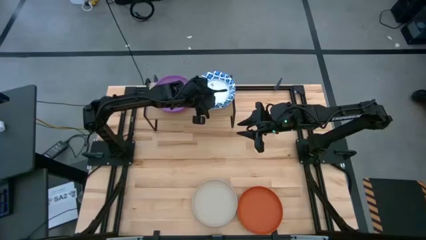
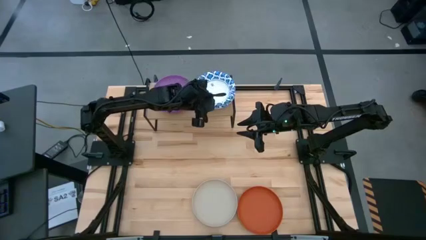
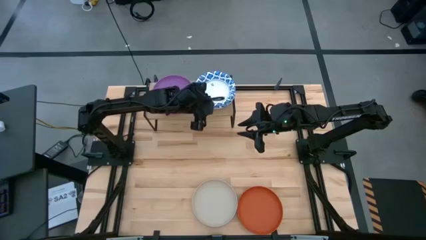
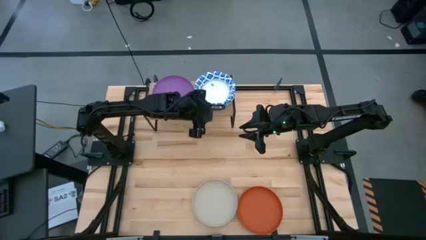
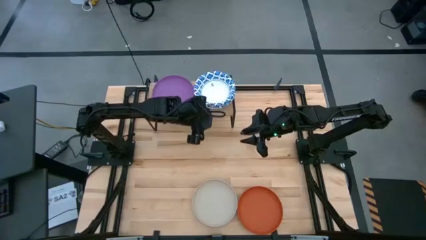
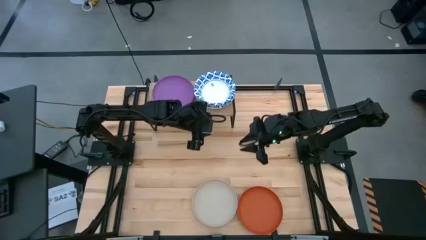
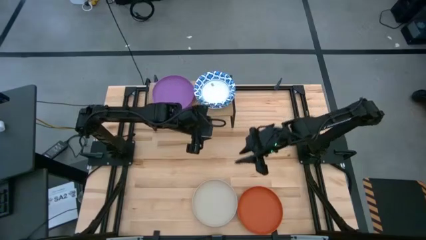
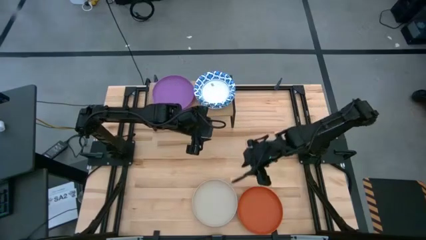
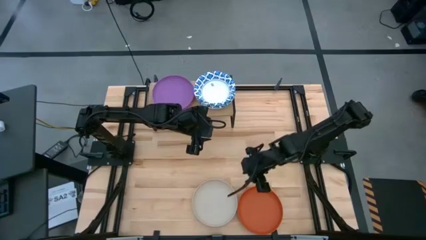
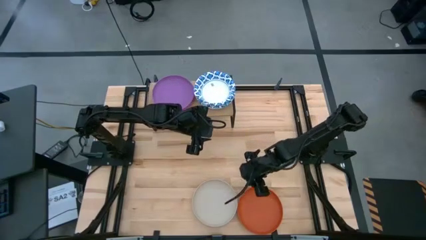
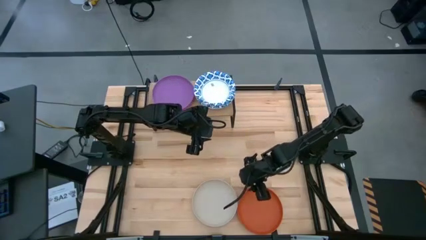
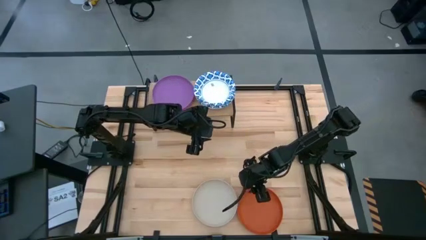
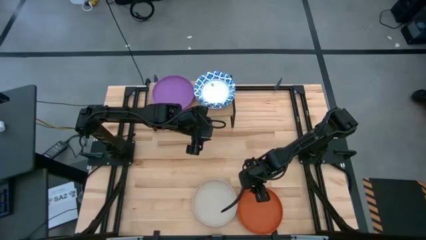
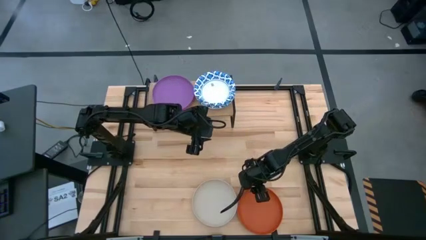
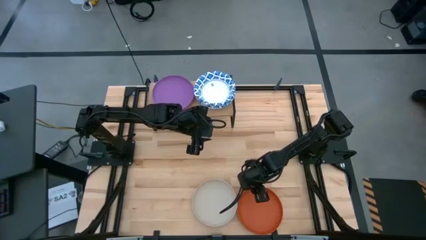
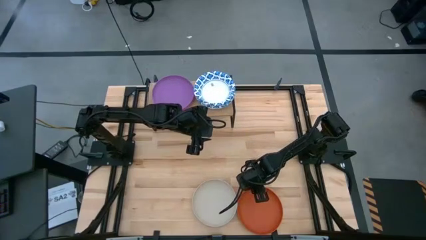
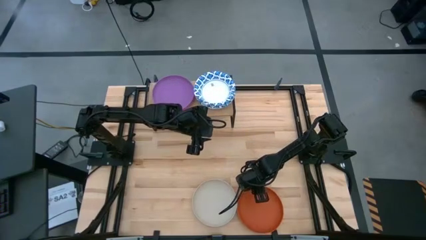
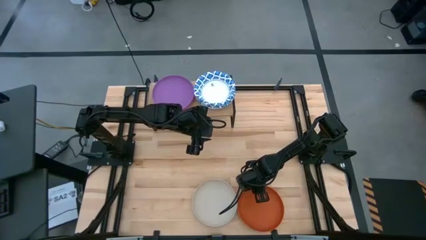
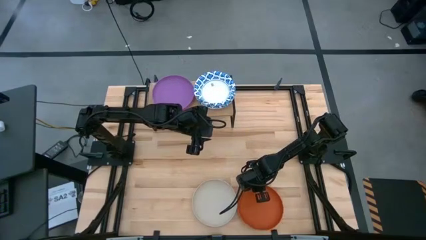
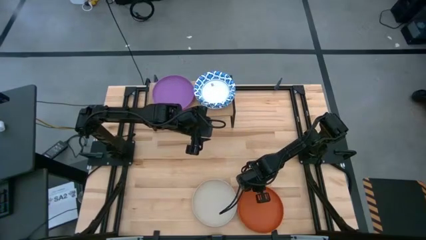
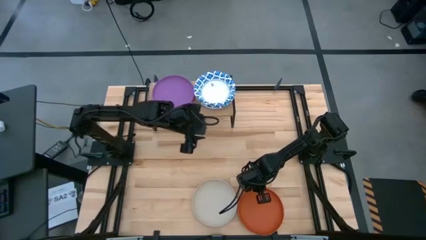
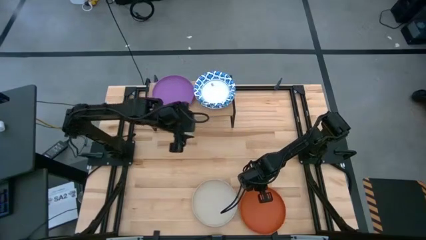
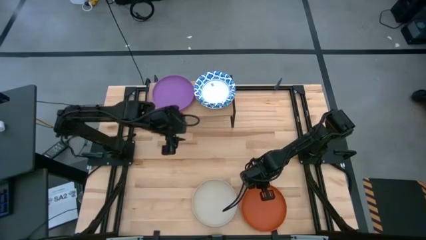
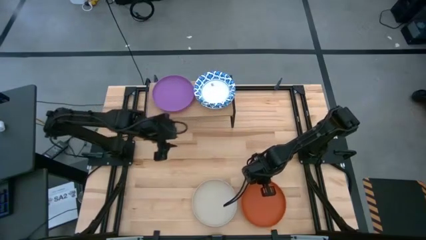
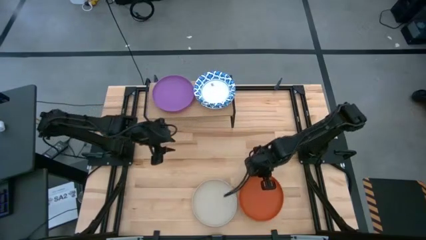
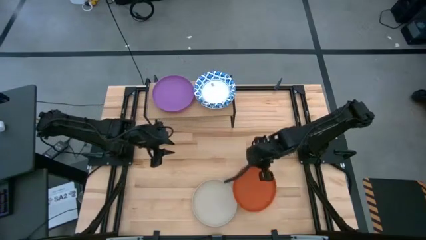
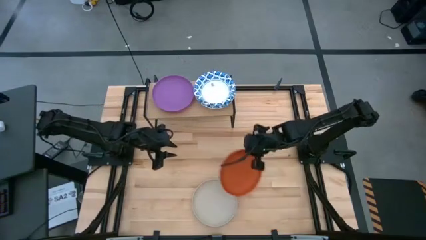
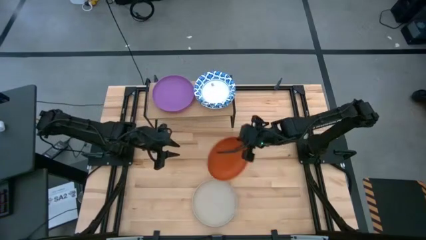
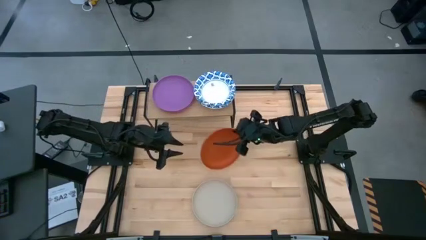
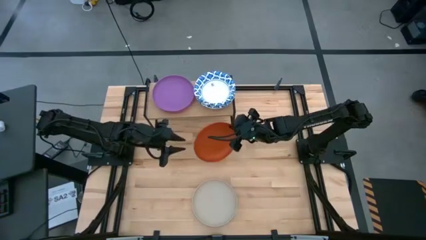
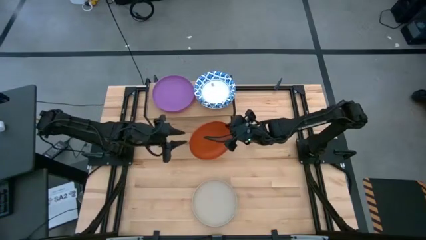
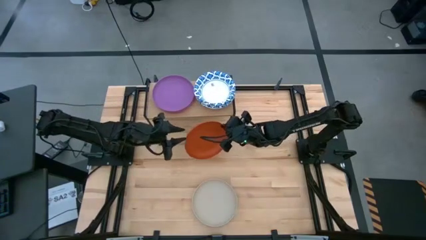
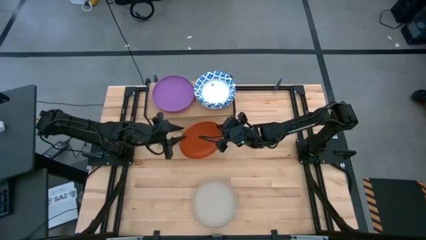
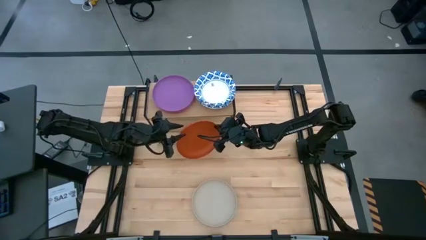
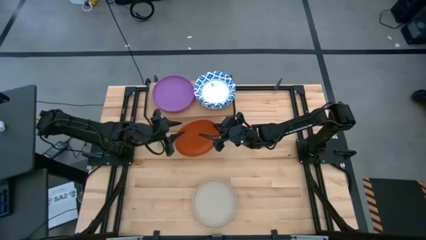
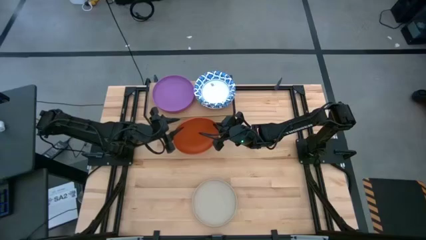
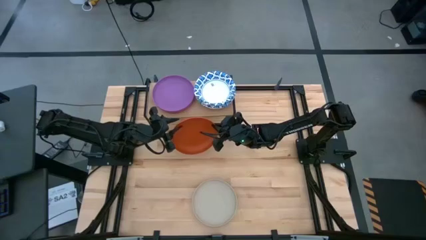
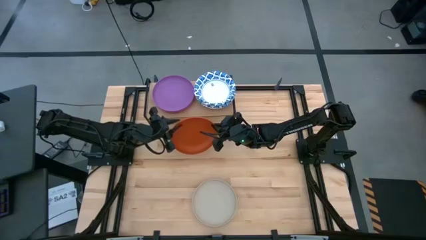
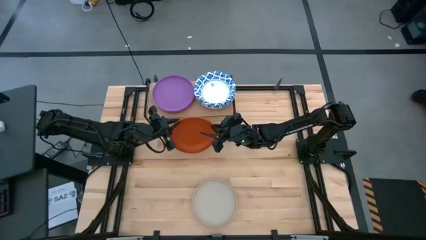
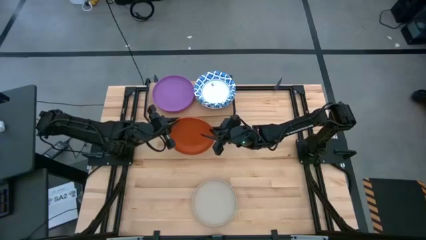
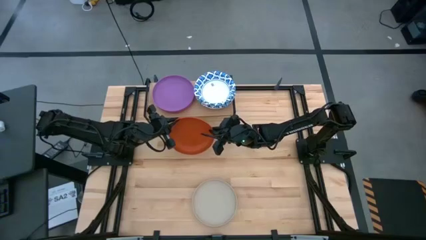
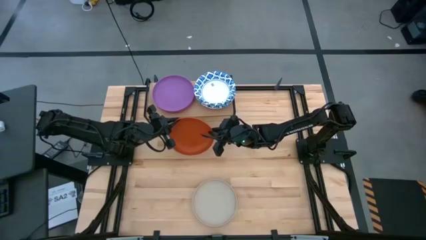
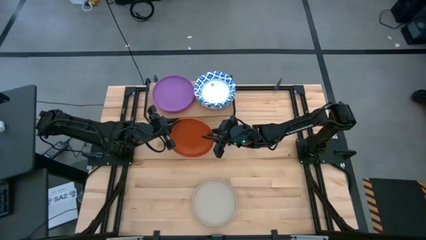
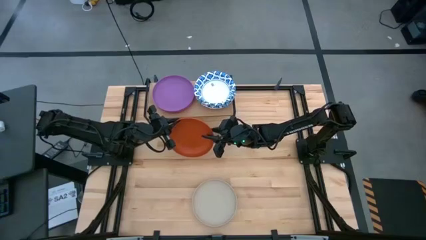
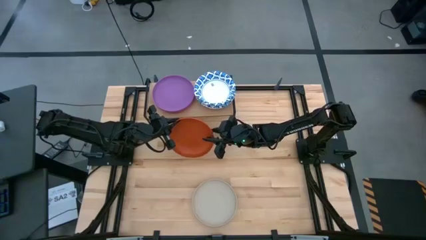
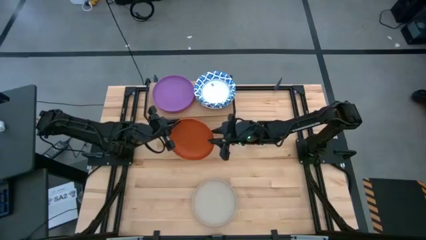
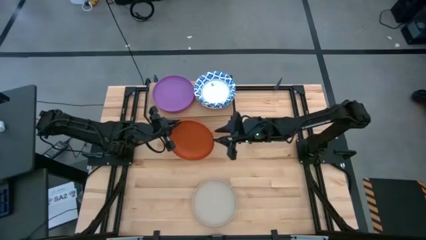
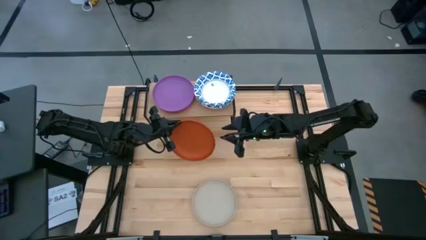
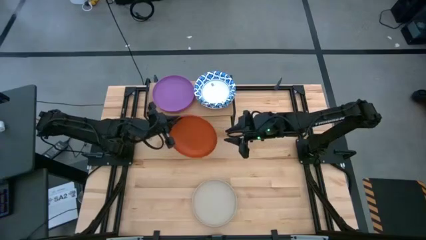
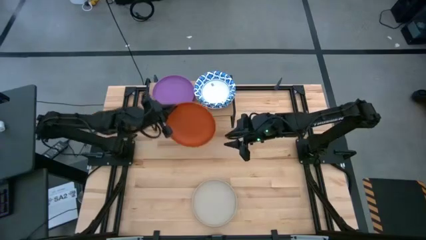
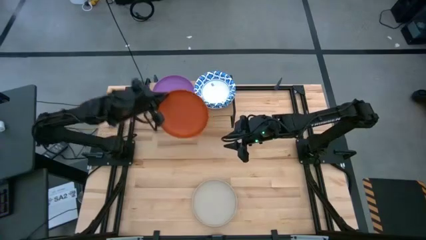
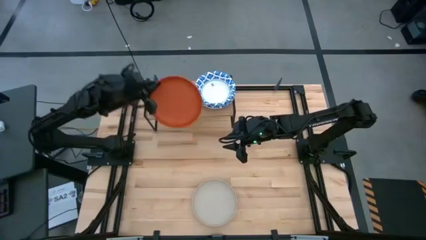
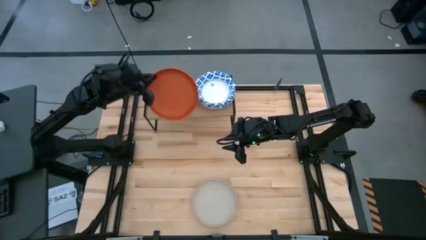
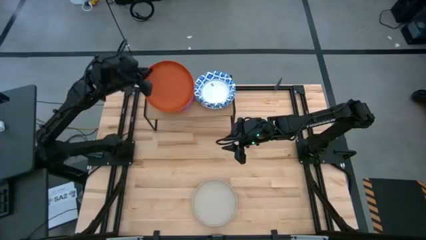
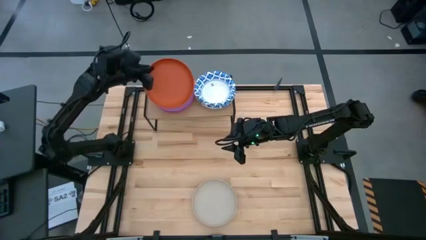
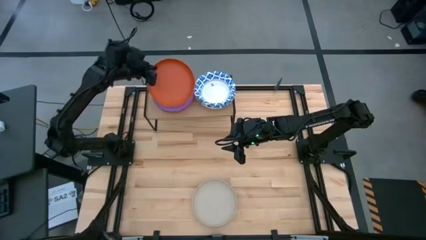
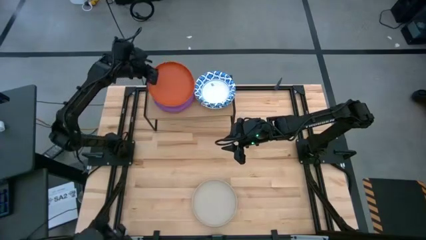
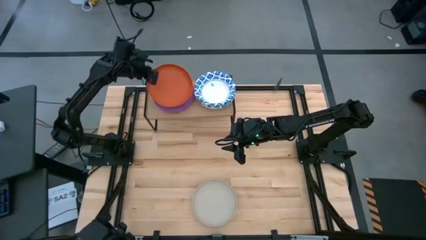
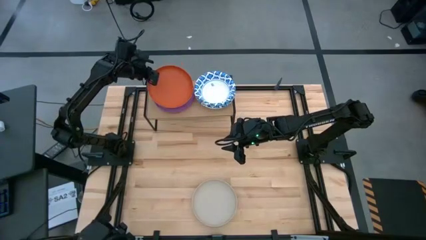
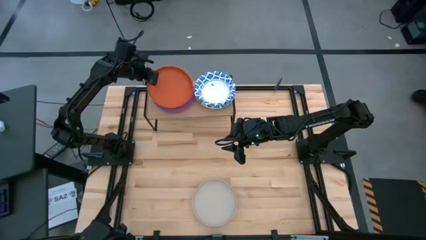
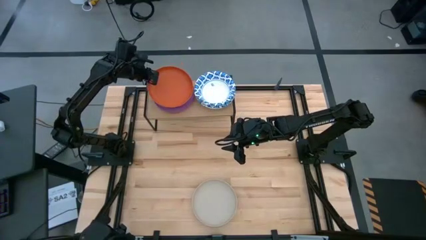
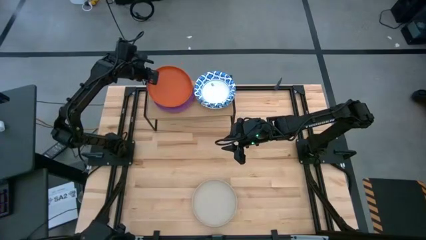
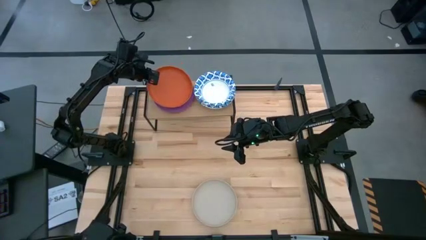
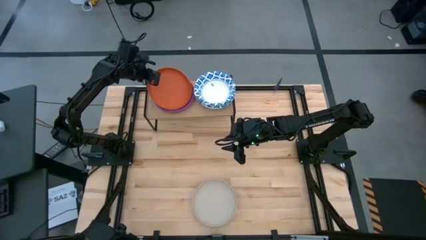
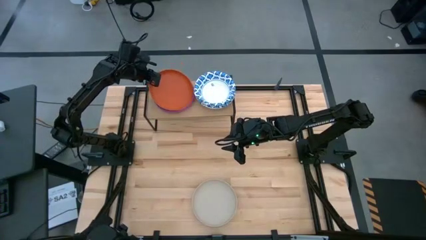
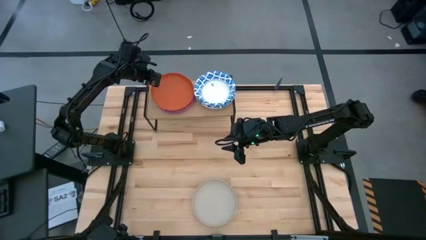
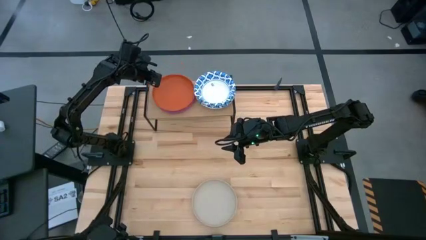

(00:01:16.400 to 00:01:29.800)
Task: Place and stack plates onto a shelf
Stack the orange plate on top of the purple plate on the shelf

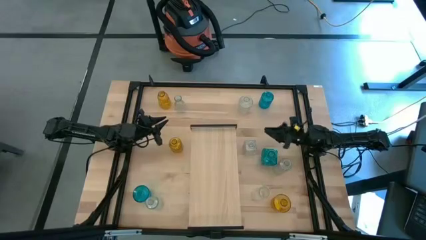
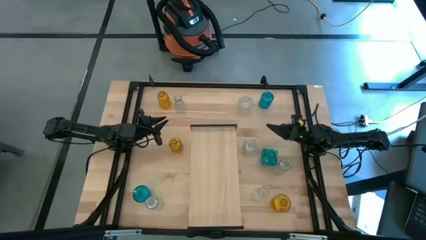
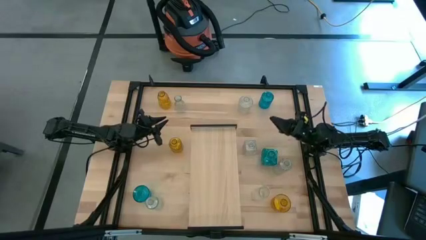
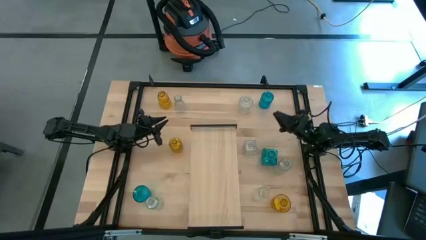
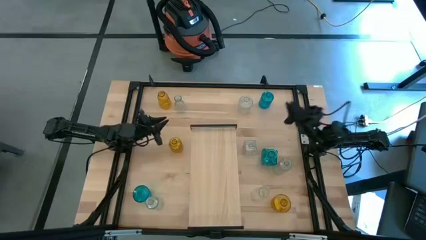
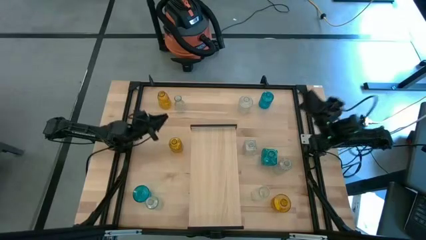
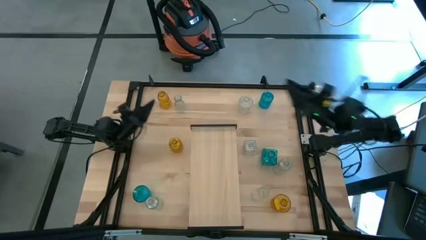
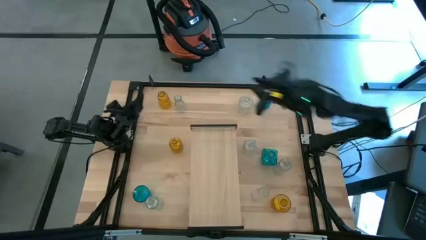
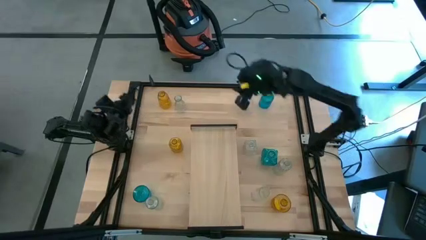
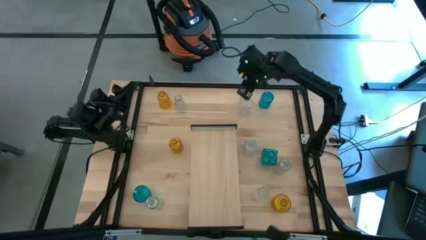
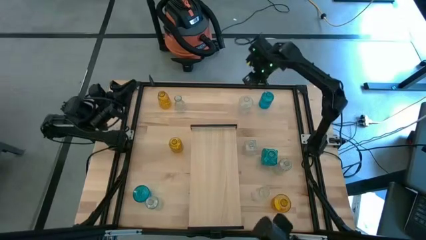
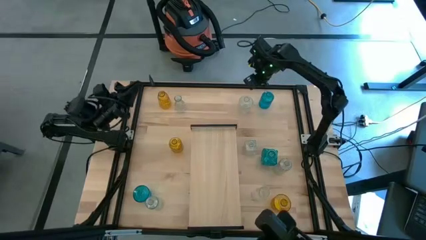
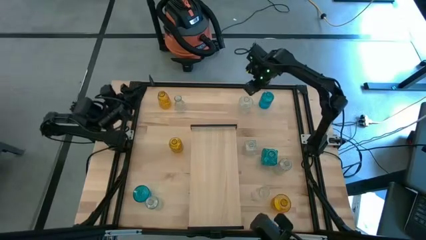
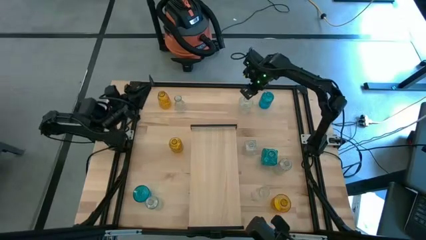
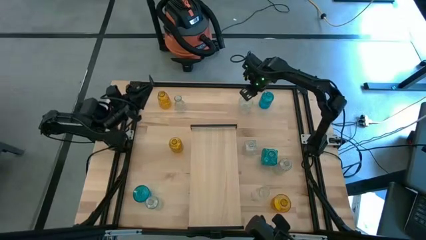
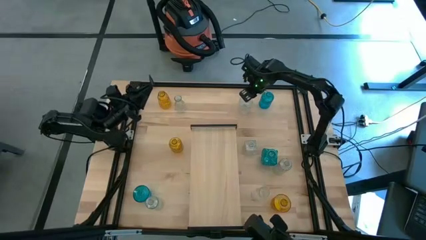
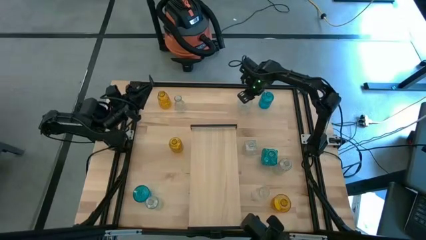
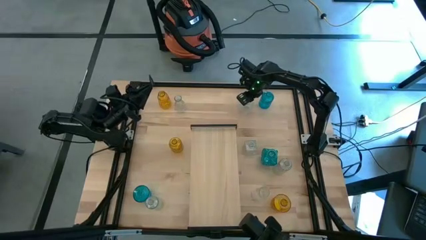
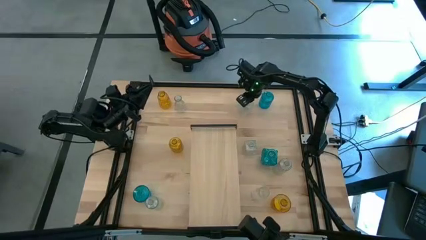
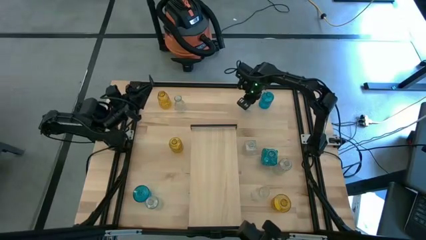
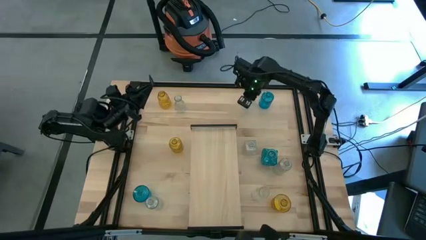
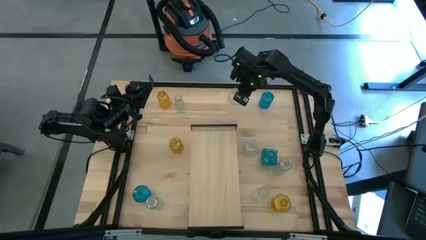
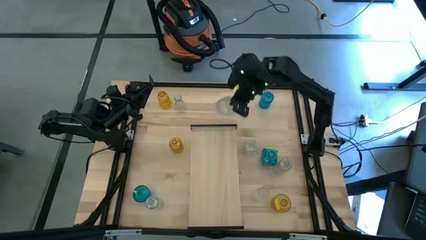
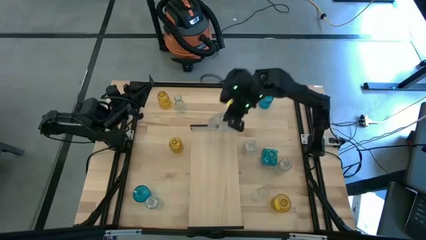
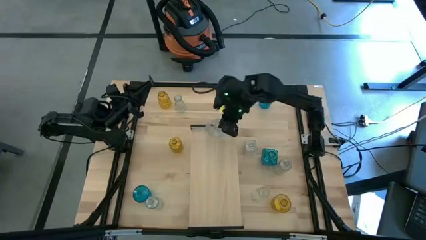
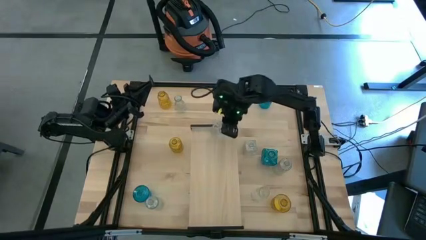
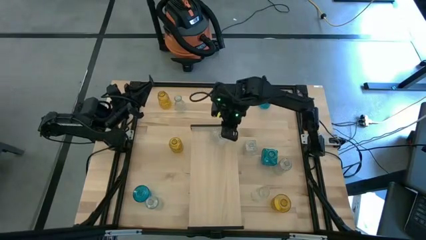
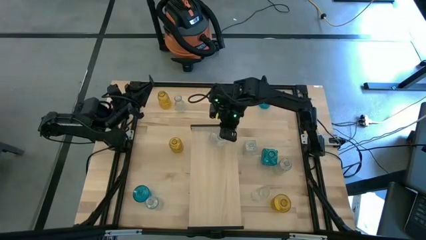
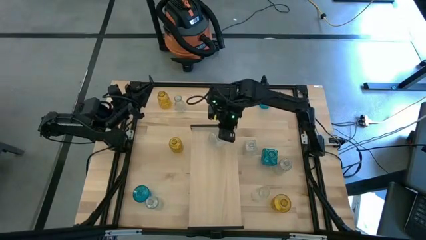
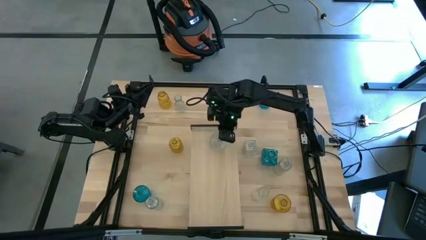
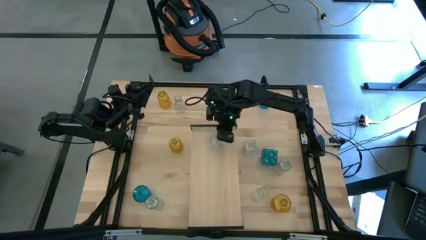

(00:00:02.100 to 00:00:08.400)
Task: sort vases onto shelf
Put the transparent vase on the shelf
